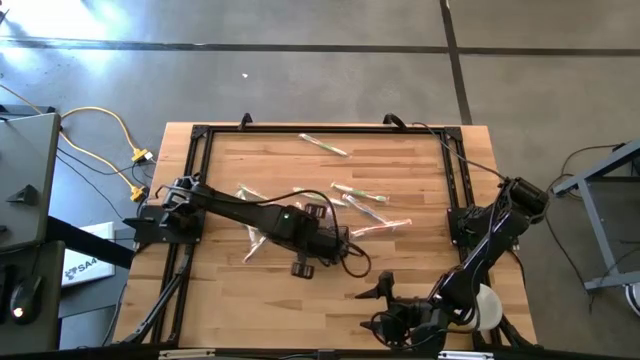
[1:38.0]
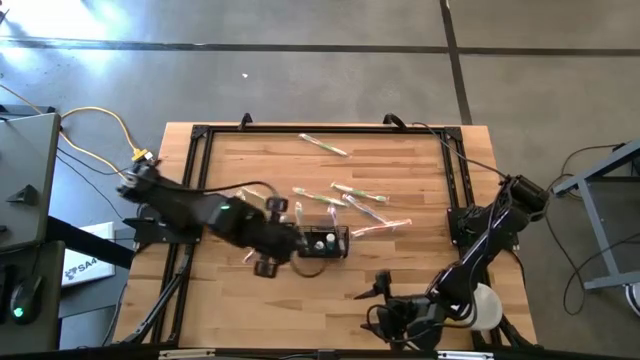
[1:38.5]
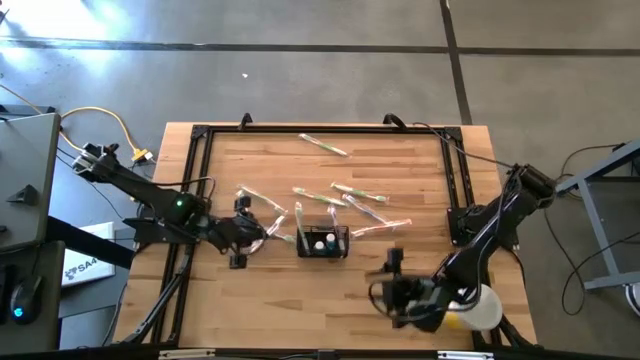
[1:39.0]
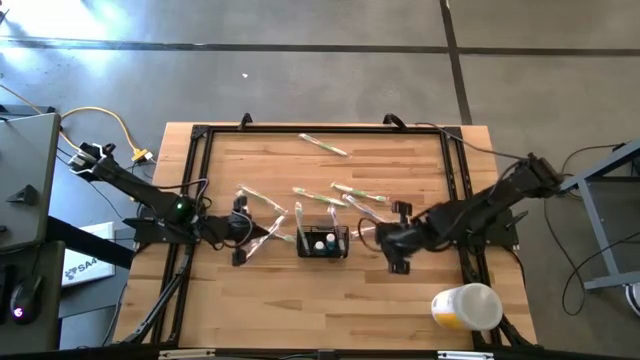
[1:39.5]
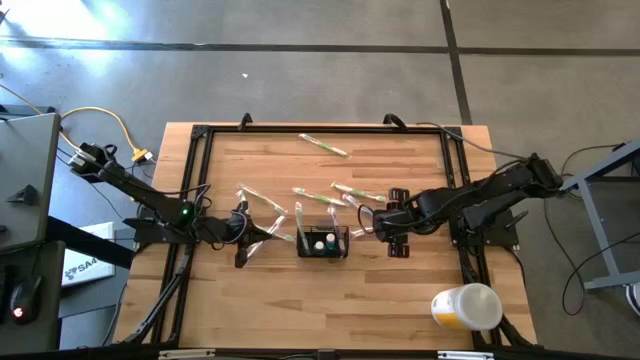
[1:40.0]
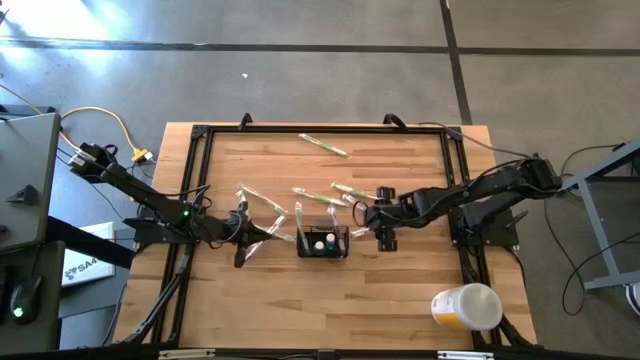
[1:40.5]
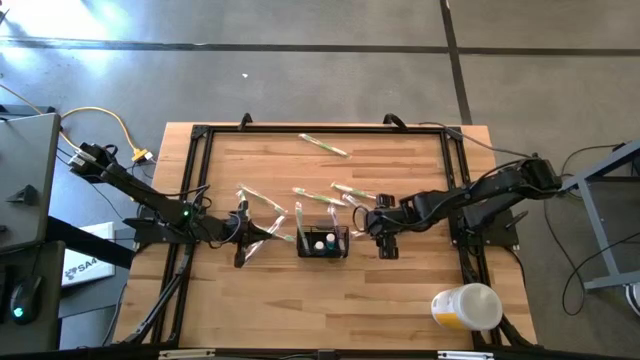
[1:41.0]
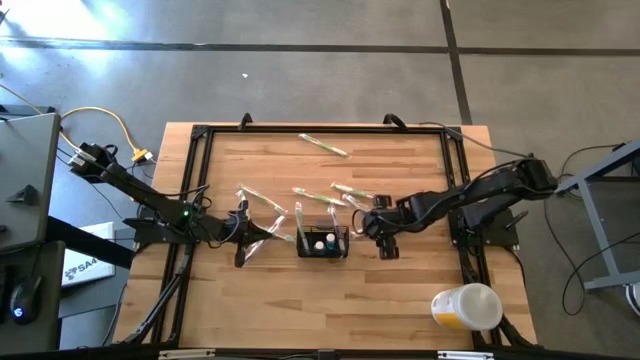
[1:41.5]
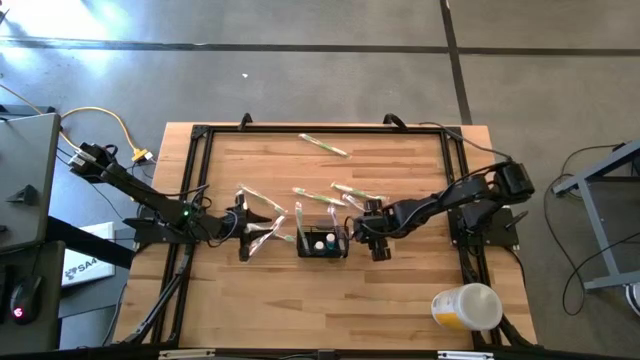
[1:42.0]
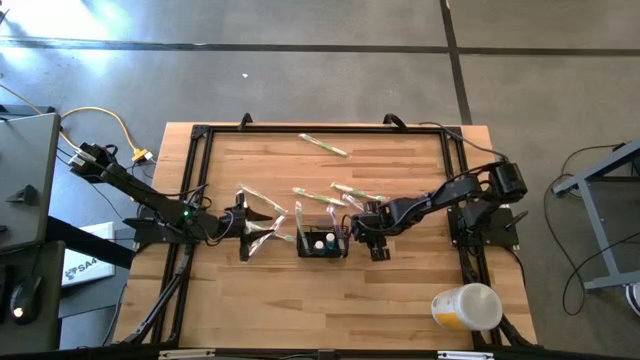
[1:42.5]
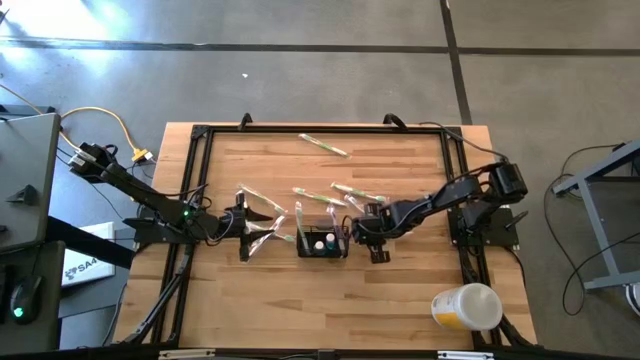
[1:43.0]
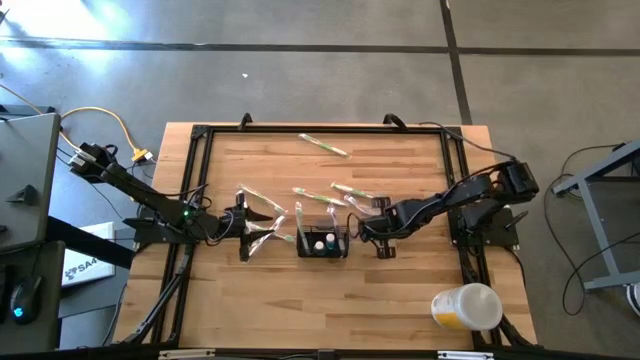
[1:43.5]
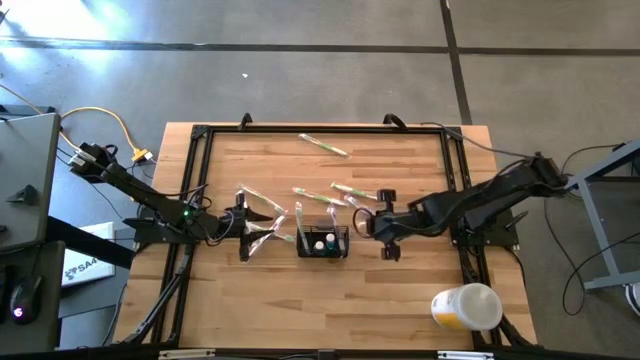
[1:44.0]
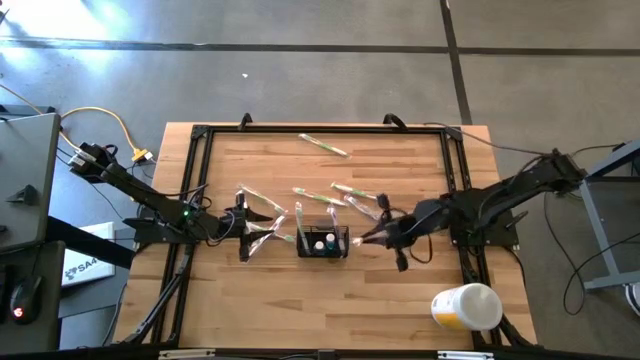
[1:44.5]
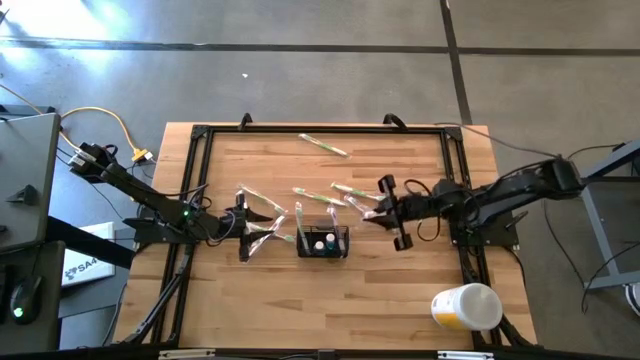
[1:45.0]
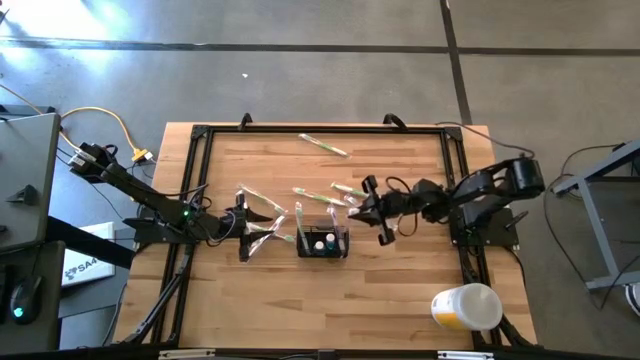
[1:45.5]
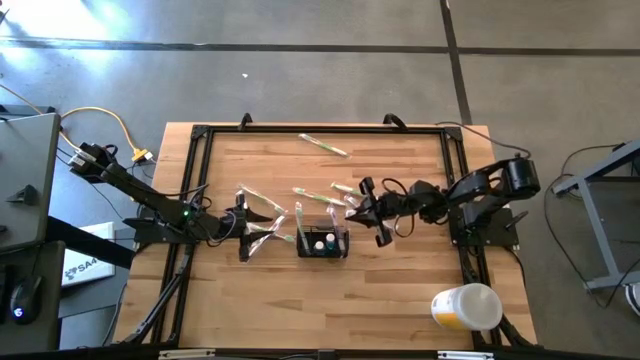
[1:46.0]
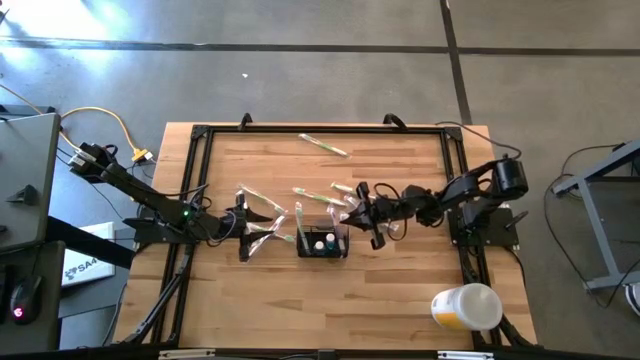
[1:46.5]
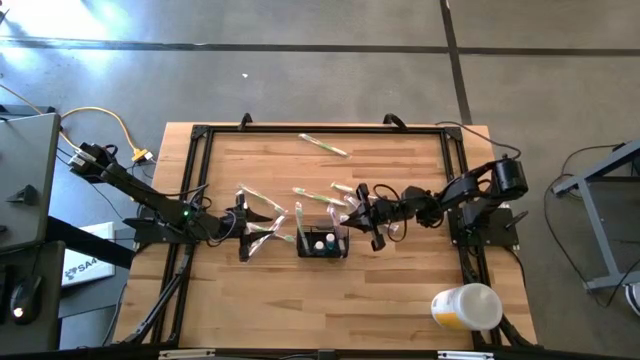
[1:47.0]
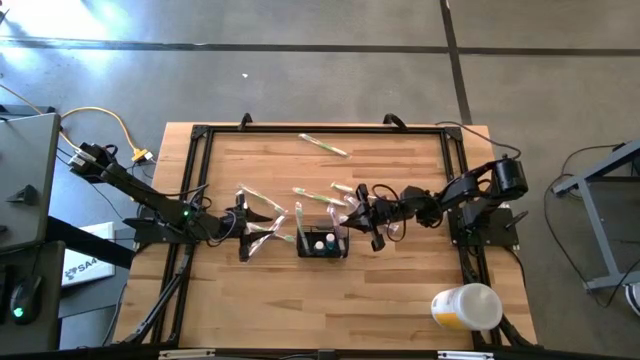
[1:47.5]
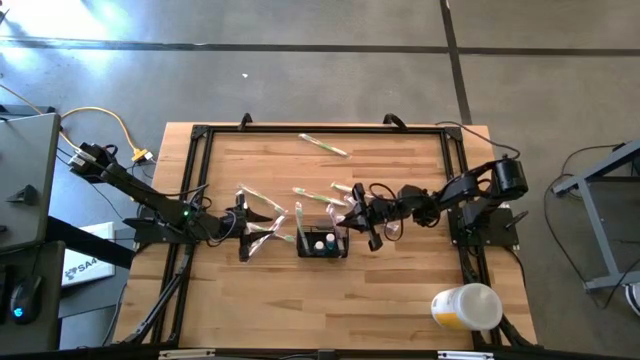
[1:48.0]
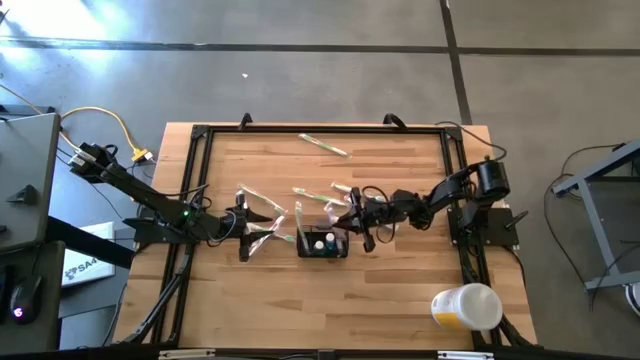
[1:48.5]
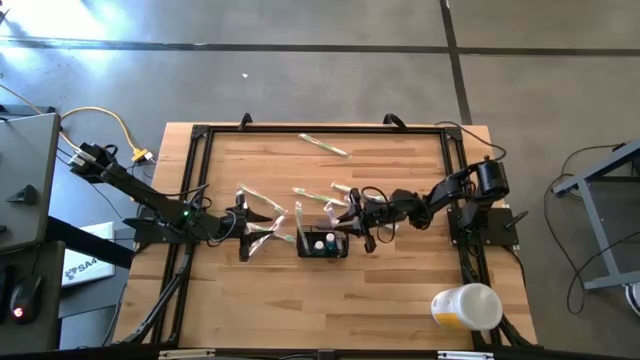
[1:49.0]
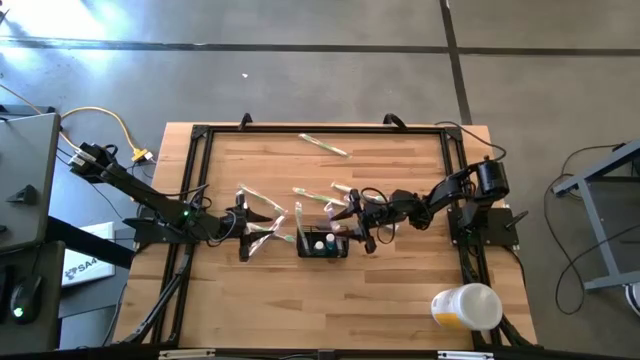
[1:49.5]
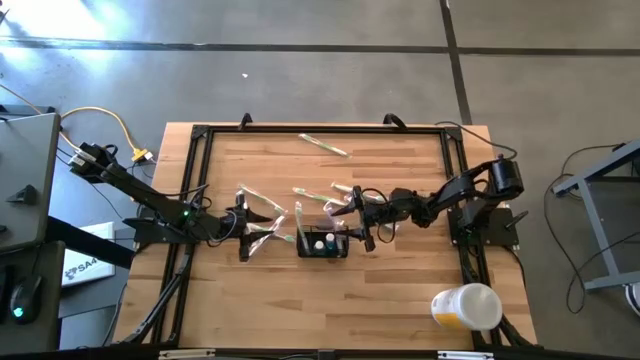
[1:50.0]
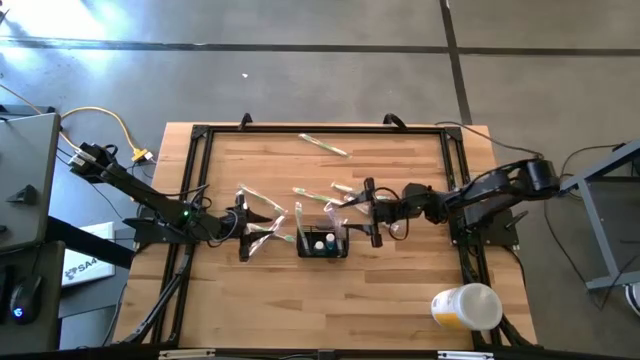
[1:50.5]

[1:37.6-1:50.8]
Task: Pick & Place toothbrushing station
Put the orange toothbrush into the wire organizer

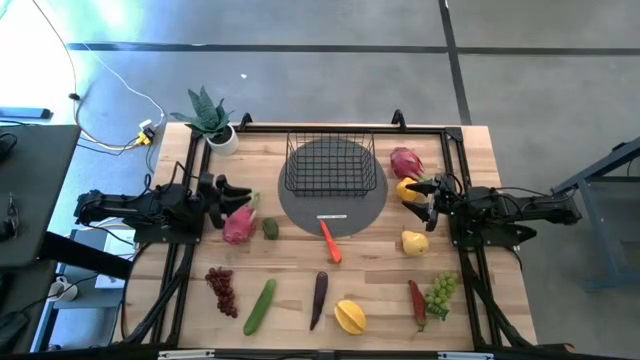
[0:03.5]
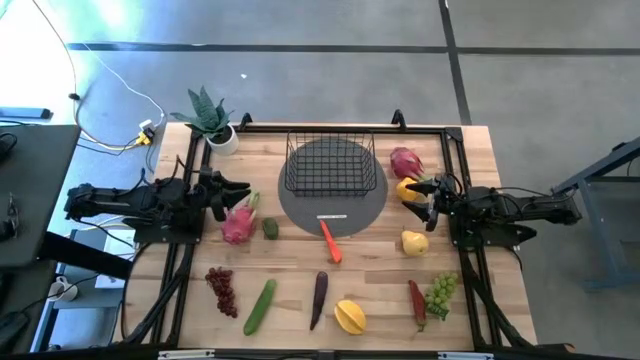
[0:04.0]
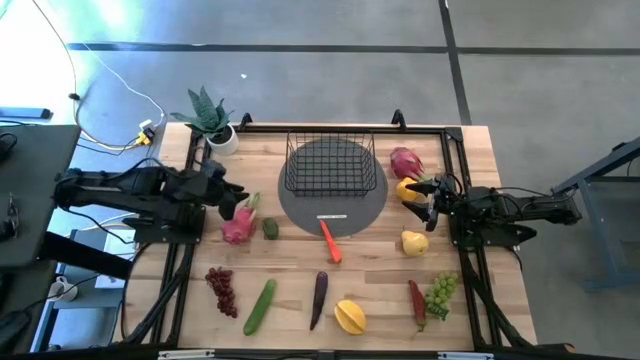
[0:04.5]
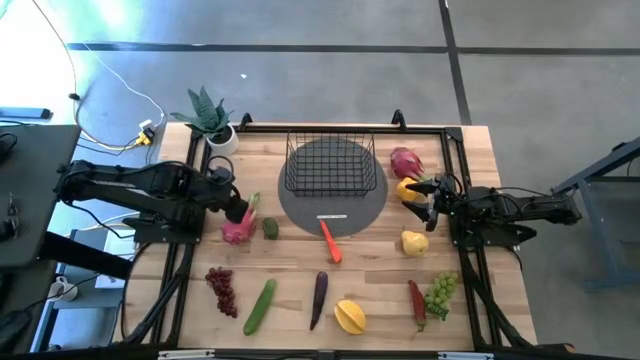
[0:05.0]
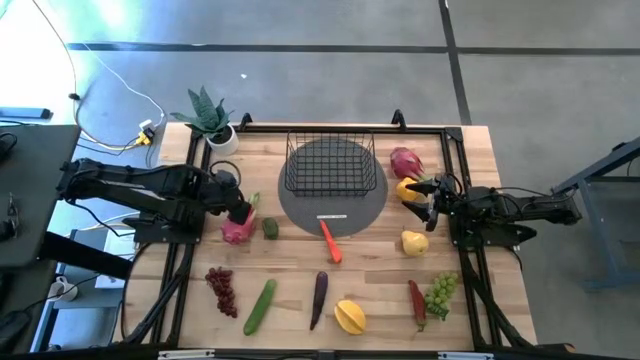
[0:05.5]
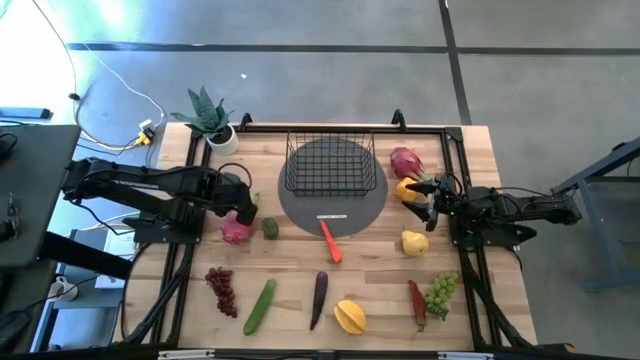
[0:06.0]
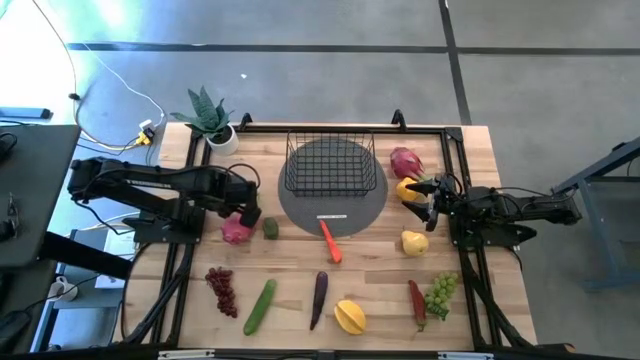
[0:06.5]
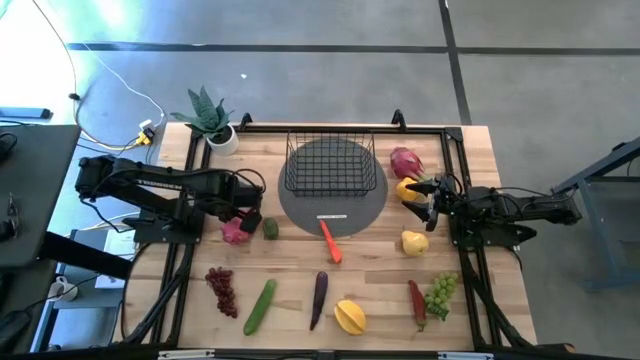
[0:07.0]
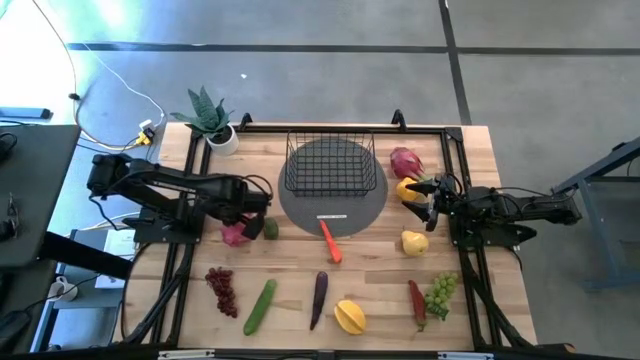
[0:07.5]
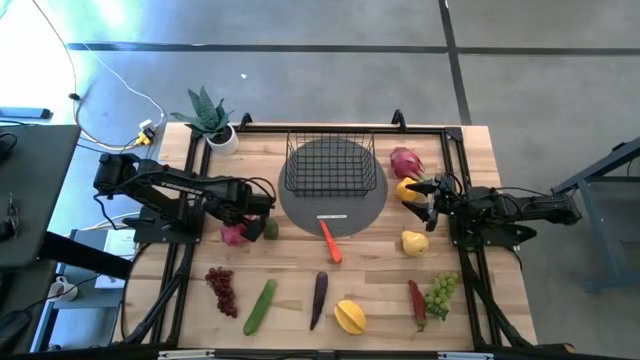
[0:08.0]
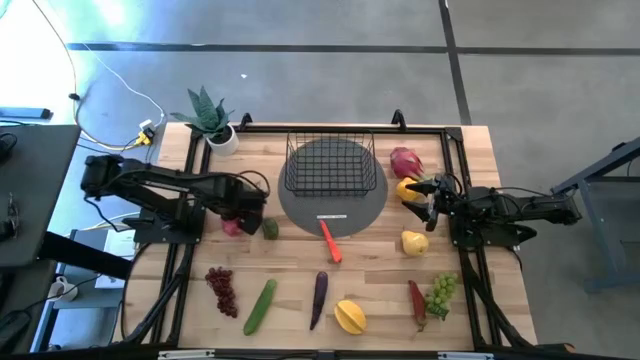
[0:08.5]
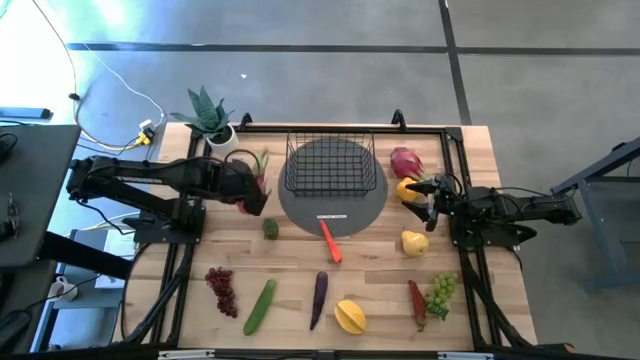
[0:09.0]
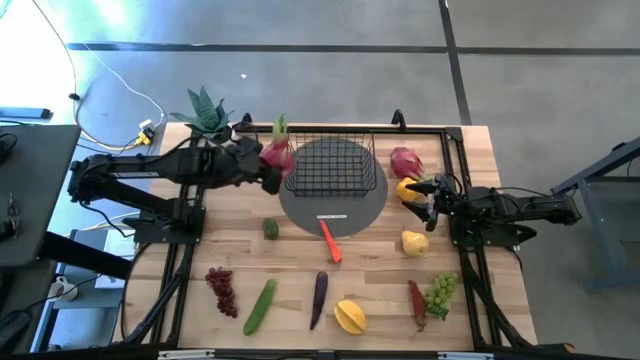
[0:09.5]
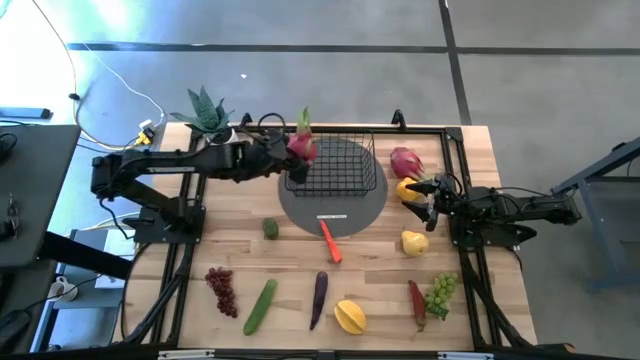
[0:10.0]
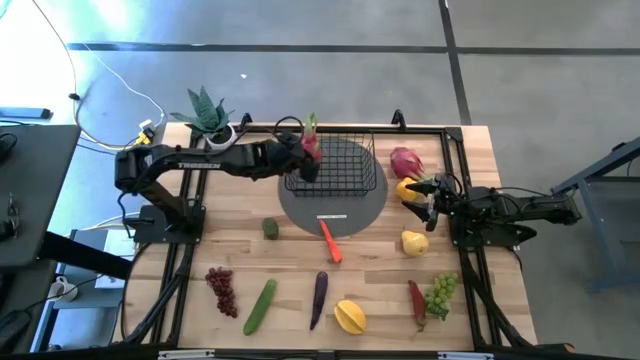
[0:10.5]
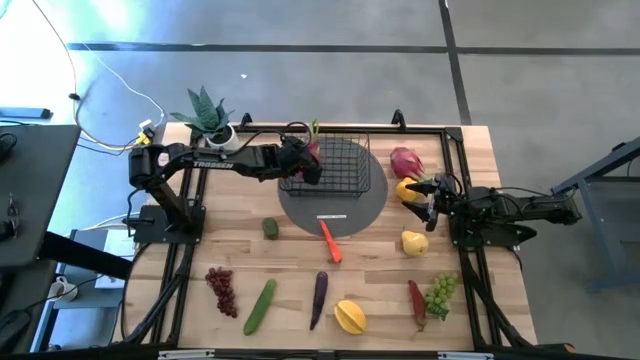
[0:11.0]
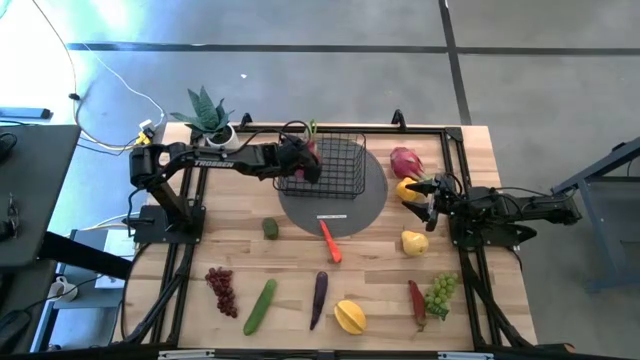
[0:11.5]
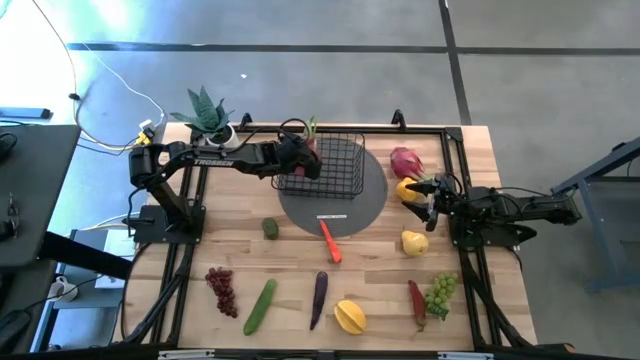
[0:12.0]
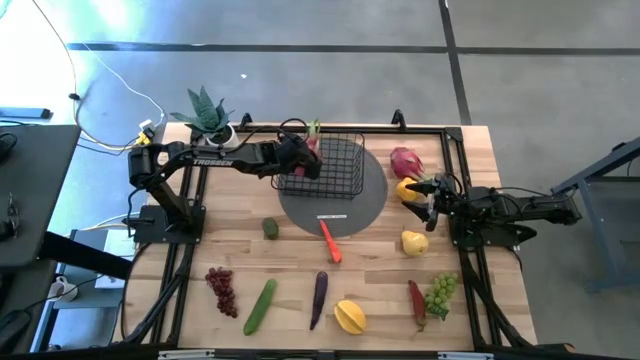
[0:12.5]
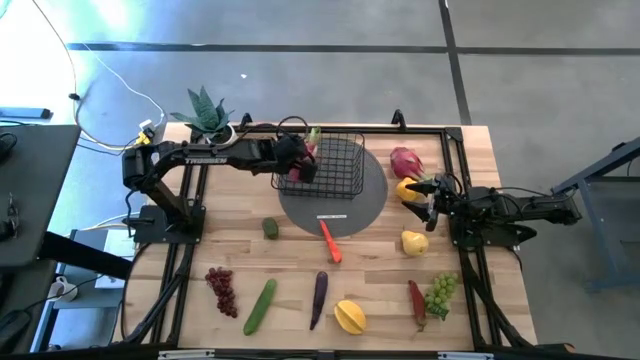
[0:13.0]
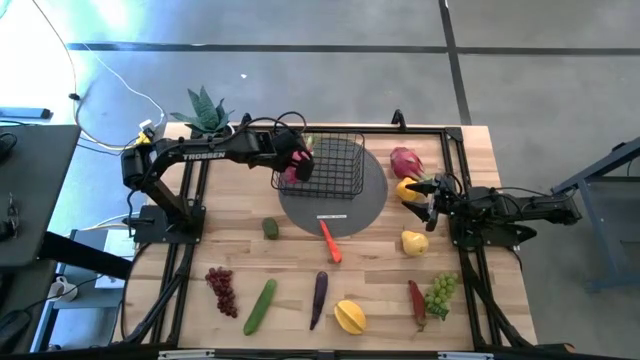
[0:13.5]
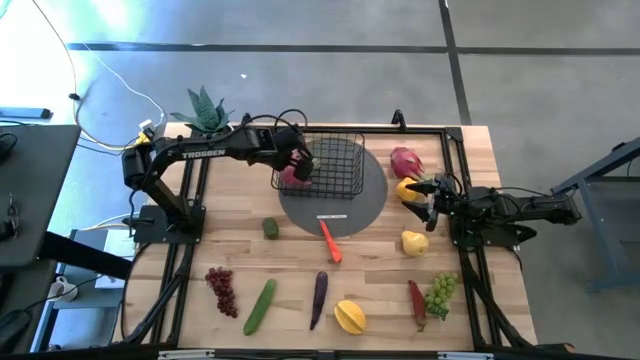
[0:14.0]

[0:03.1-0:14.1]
Task: Build produce basket
Put the left pink dragon fruit into the black wire basket
